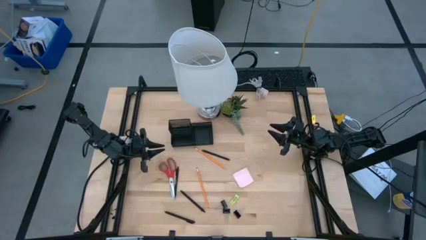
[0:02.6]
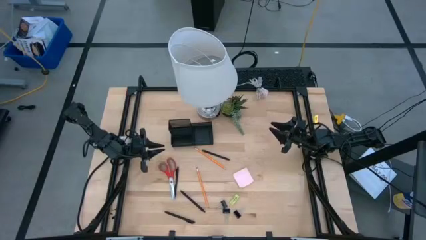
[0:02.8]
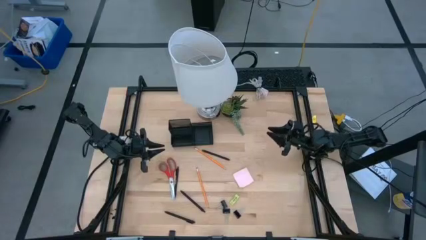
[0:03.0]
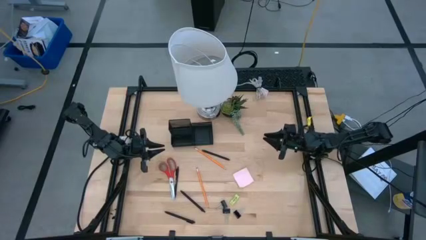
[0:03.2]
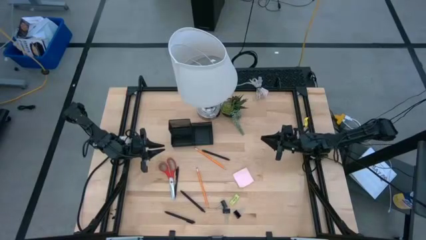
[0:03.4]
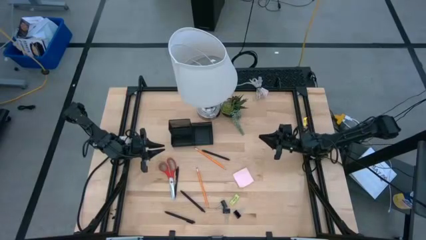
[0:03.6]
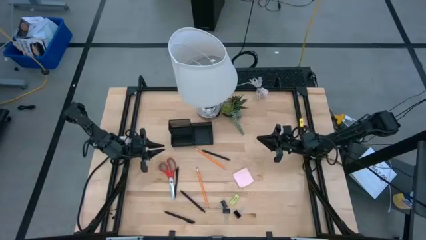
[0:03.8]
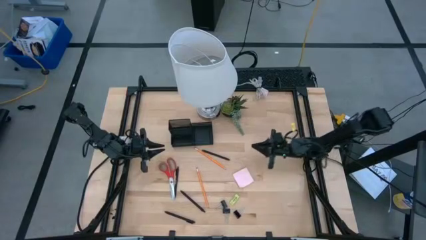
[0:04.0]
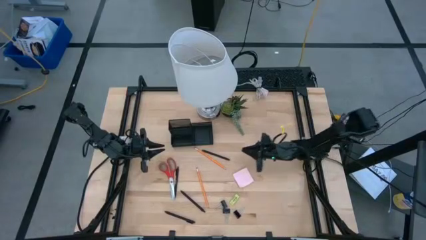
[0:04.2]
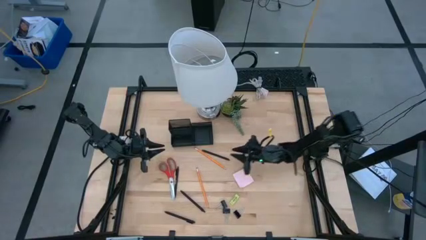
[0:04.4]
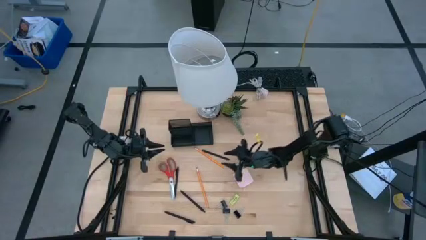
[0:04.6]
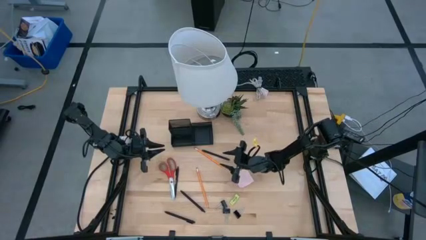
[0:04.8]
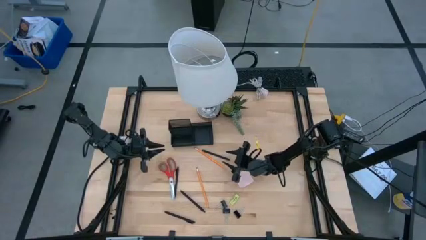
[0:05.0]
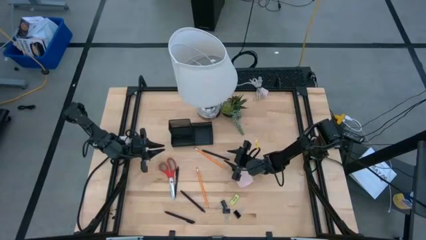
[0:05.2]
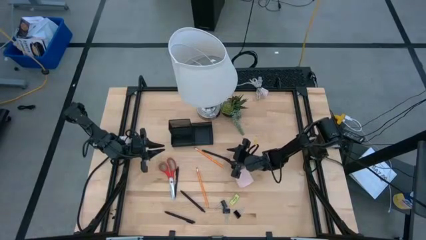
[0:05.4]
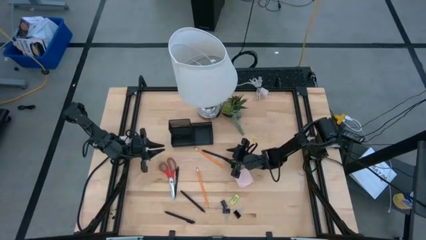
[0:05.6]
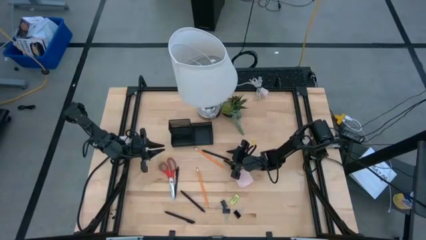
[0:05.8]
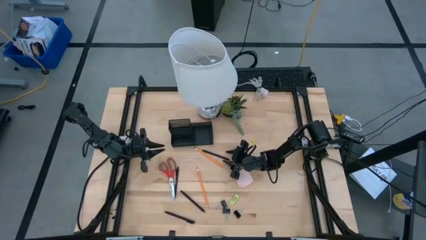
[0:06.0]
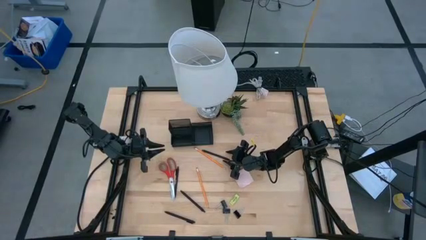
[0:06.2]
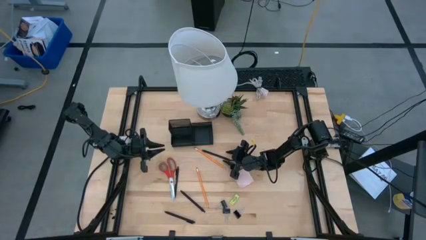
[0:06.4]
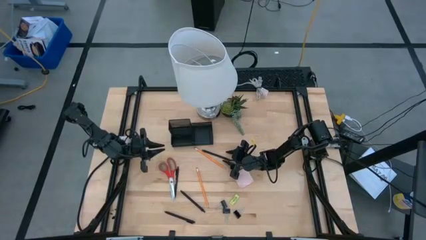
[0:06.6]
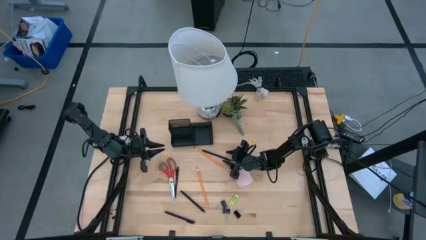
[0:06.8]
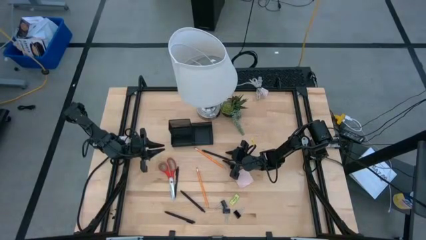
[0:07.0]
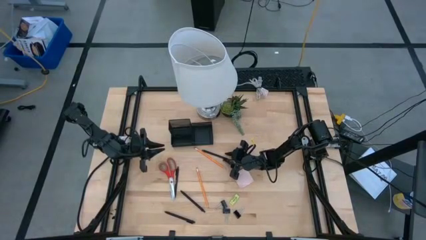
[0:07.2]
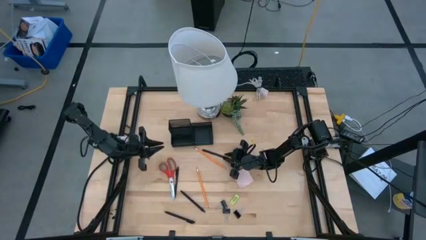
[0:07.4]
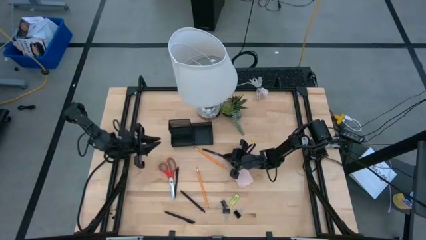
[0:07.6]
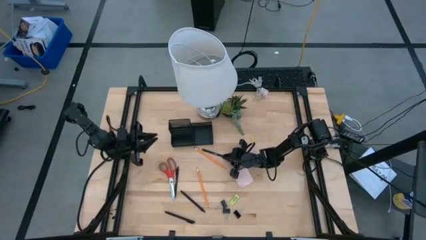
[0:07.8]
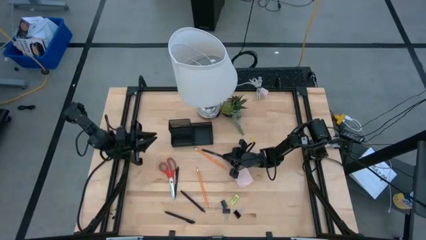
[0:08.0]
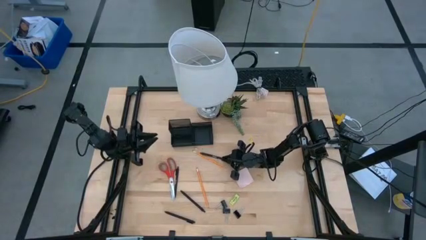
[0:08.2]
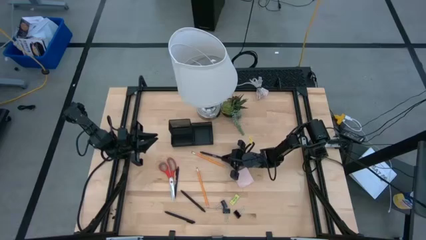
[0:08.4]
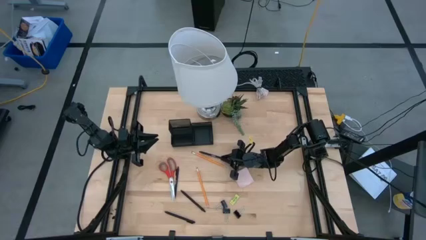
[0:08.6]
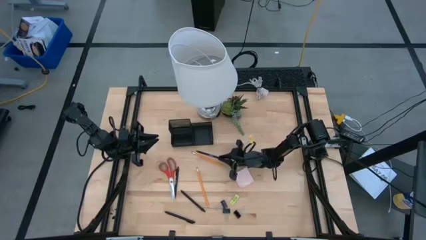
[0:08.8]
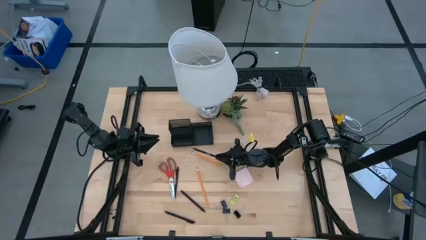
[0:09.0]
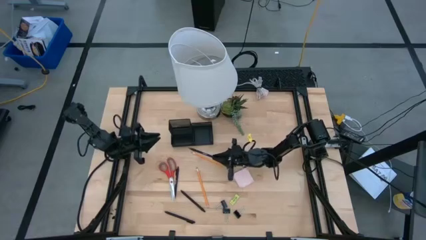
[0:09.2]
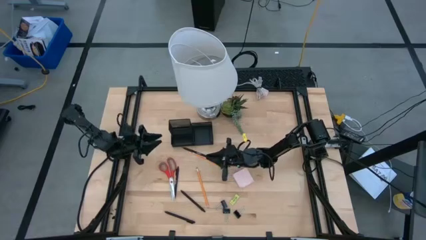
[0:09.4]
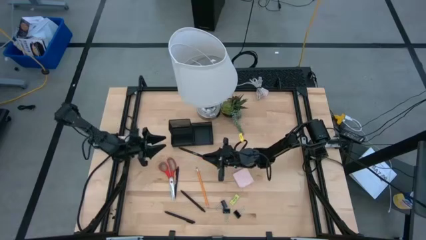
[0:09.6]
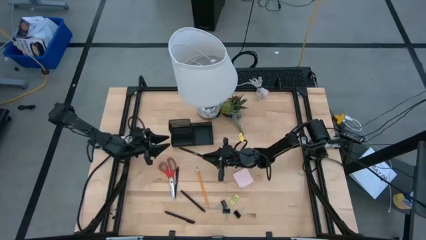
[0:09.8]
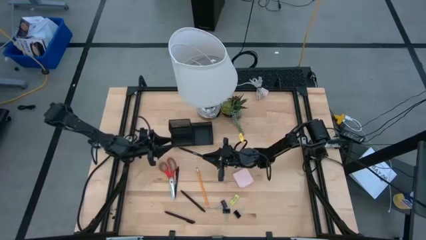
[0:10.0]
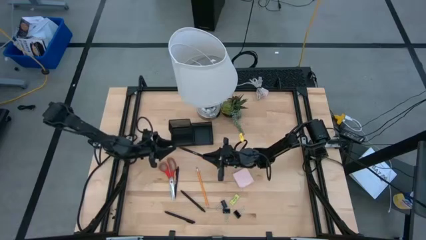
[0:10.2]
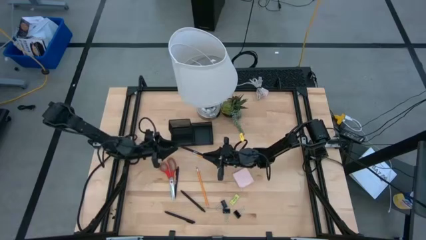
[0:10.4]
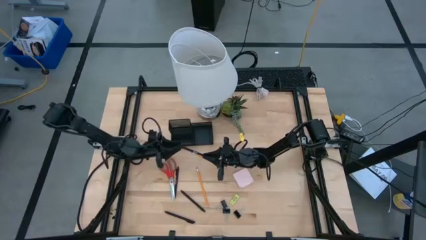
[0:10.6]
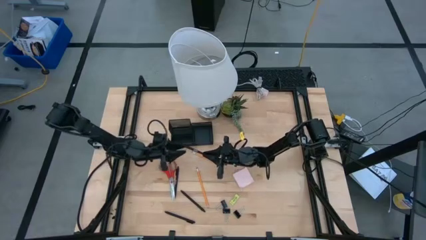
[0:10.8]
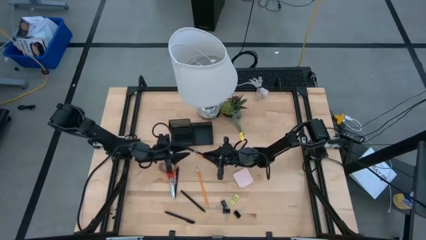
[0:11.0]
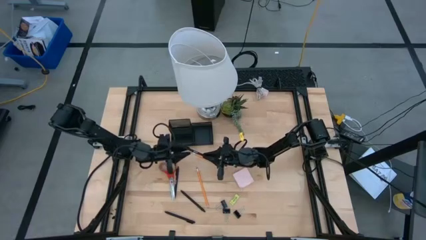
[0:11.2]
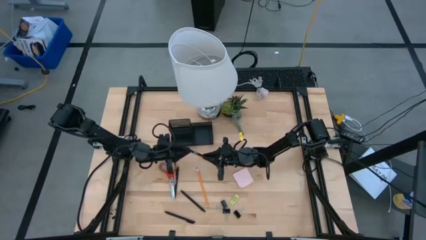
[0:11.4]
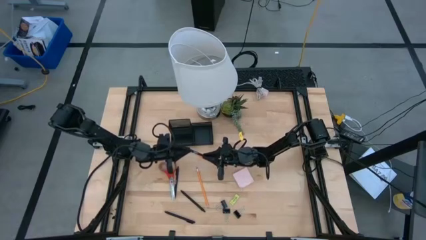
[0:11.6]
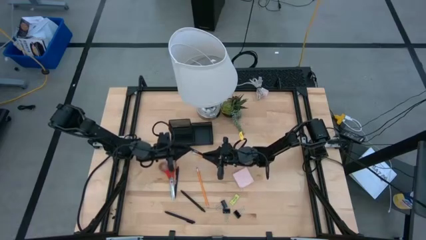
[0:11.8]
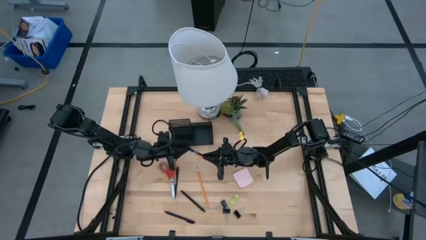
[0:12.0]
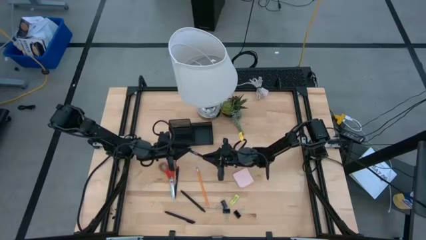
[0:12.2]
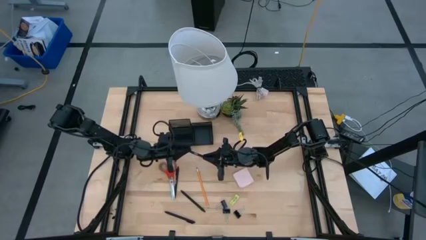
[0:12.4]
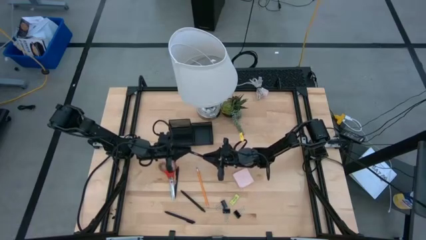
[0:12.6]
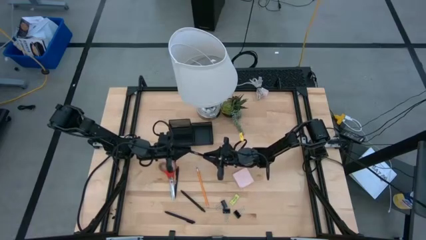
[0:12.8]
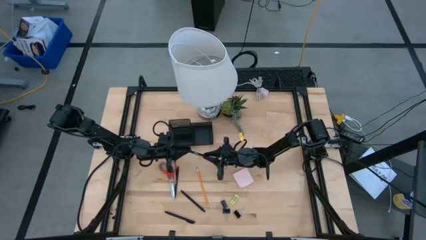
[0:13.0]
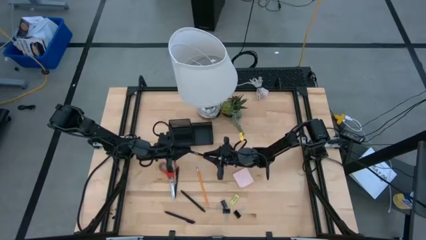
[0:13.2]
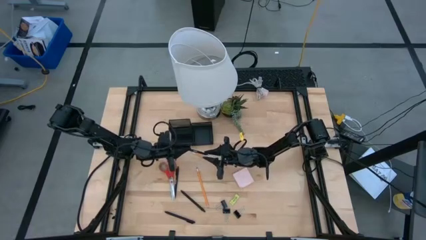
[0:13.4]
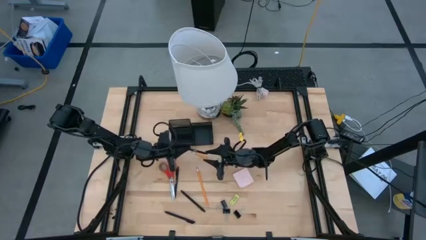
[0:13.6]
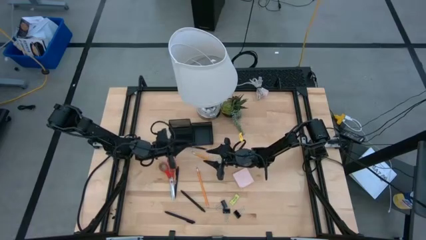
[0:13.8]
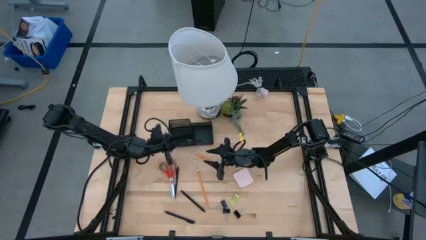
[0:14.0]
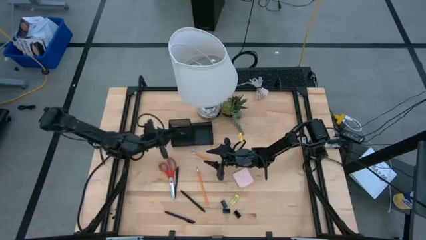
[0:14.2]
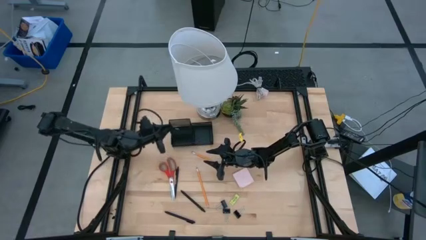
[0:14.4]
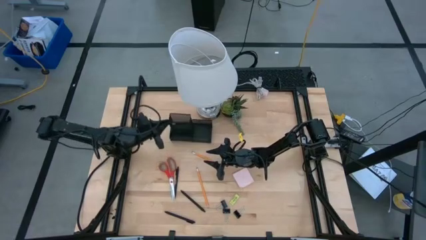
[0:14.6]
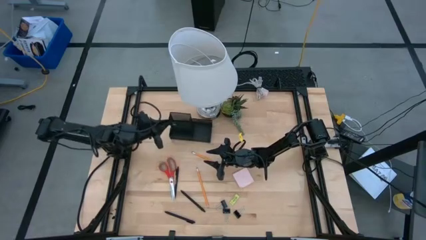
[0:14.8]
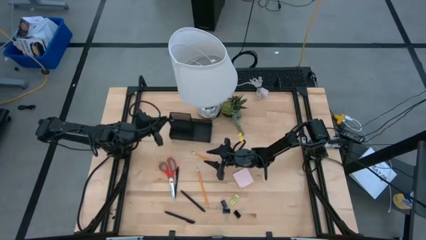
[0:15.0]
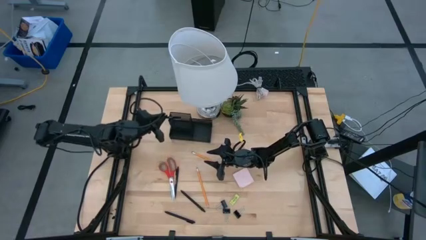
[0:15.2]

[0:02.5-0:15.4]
Task: Pick and place office supplies into organizer
Put the black pen into the black desk organizer

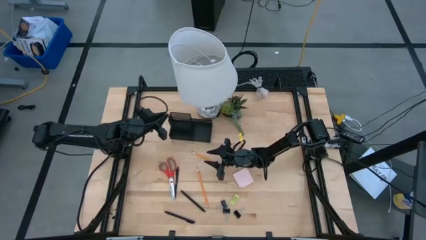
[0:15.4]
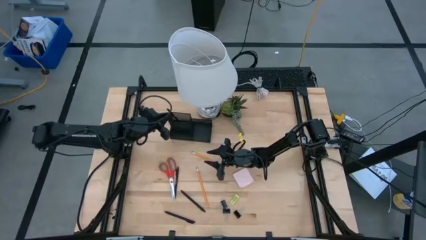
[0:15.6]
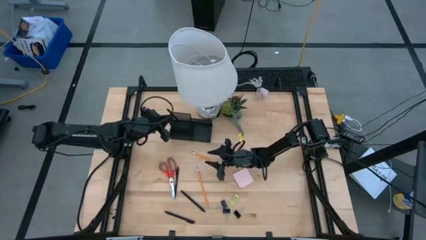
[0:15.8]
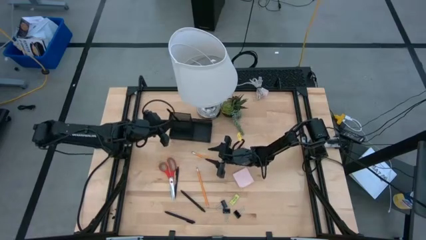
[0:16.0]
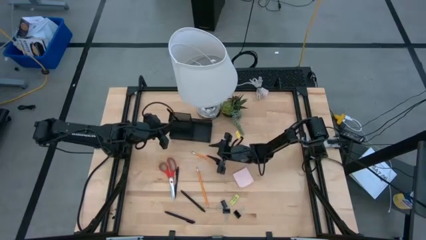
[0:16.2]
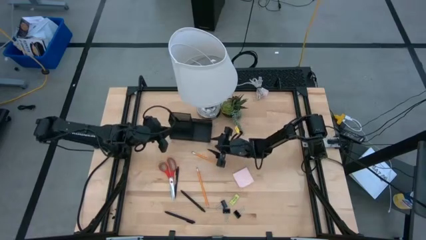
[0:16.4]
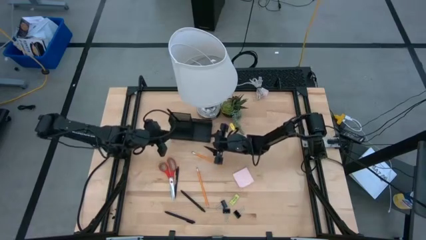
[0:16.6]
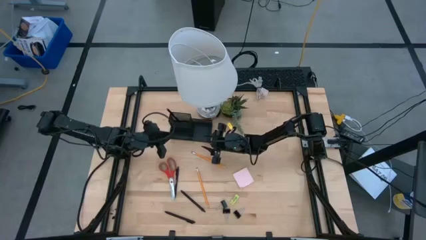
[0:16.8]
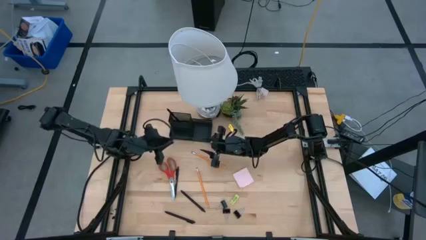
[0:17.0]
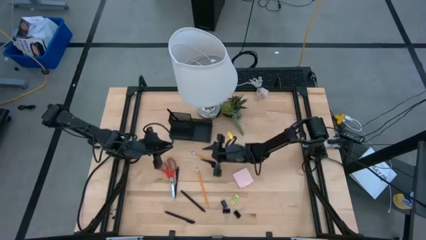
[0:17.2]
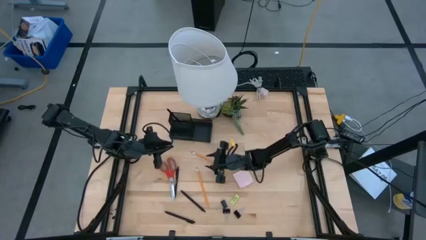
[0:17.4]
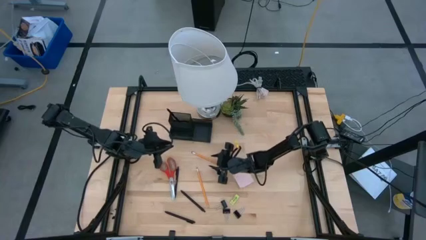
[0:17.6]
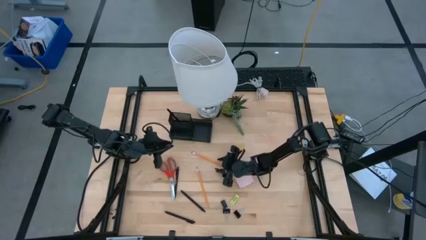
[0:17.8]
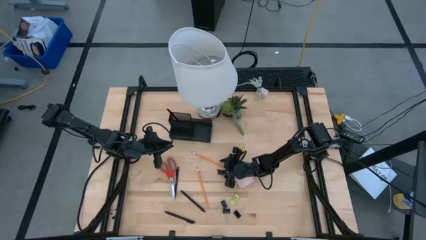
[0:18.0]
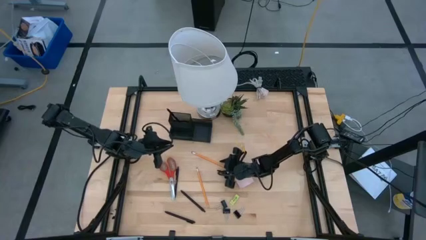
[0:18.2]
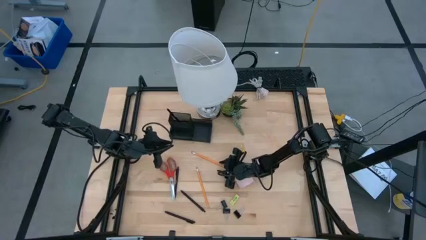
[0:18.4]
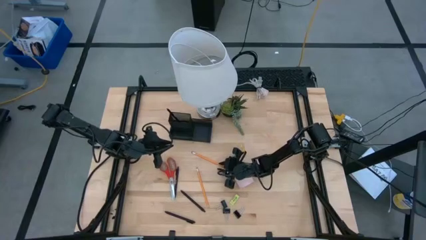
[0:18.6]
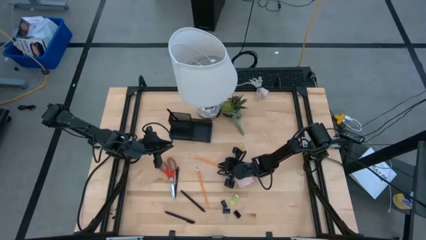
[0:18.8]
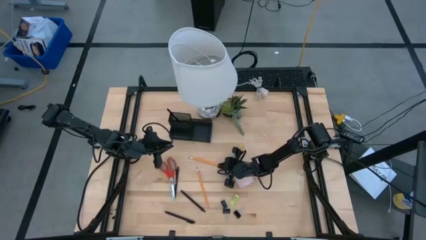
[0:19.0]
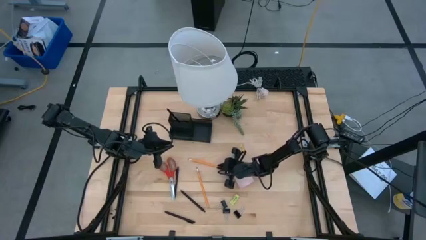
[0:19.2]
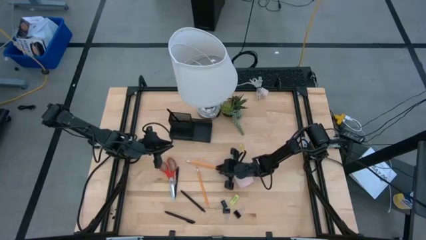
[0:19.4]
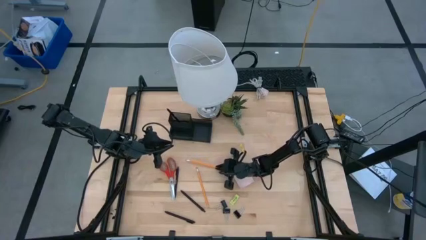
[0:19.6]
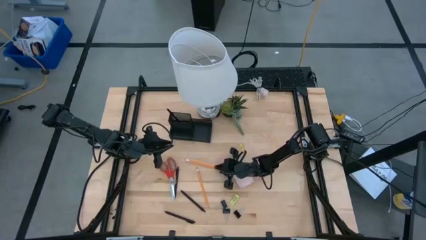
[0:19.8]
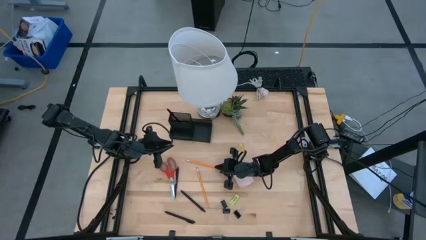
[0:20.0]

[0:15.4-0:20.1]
Put the orange pencil into the black desk organizer
